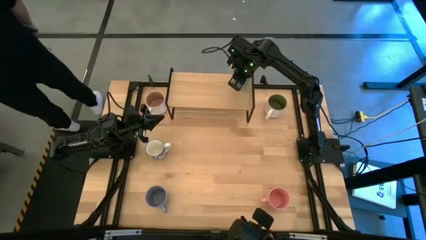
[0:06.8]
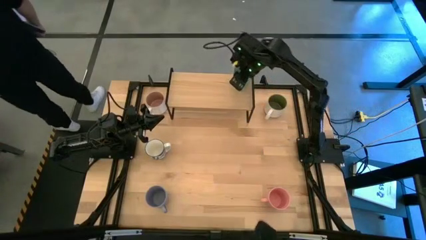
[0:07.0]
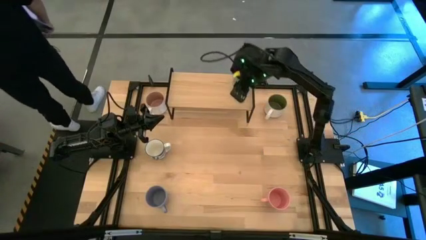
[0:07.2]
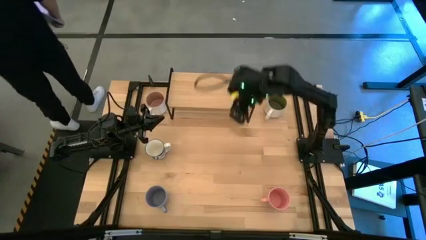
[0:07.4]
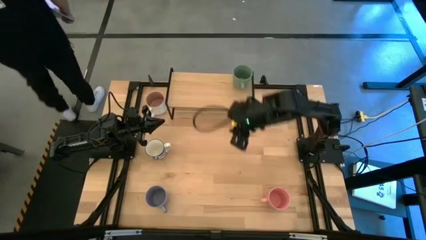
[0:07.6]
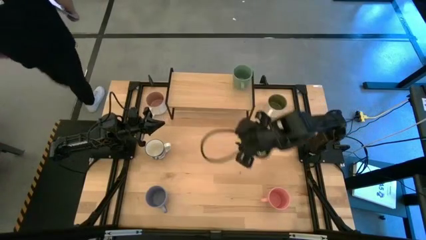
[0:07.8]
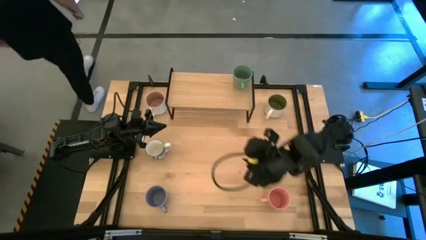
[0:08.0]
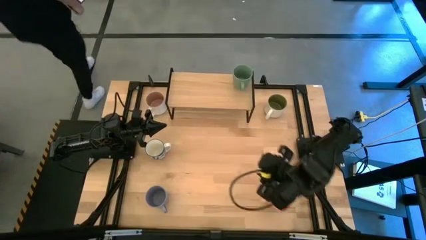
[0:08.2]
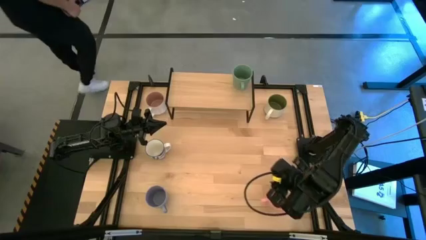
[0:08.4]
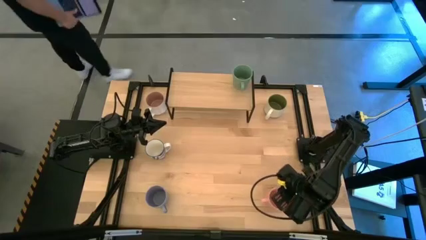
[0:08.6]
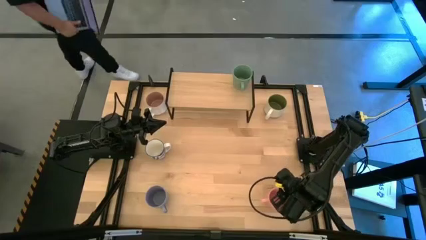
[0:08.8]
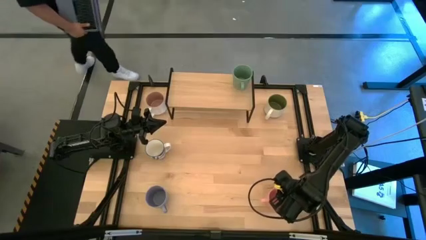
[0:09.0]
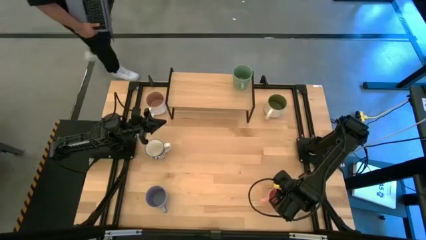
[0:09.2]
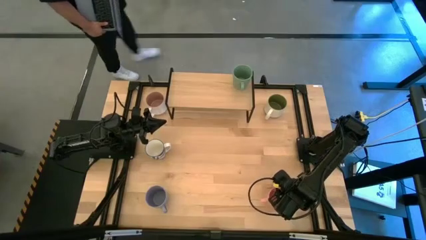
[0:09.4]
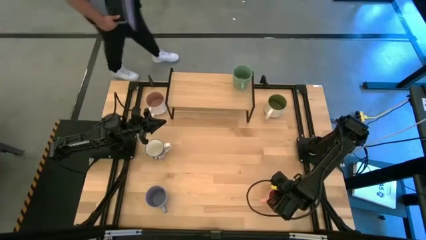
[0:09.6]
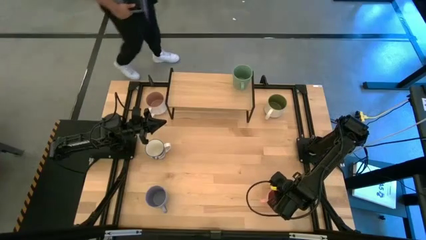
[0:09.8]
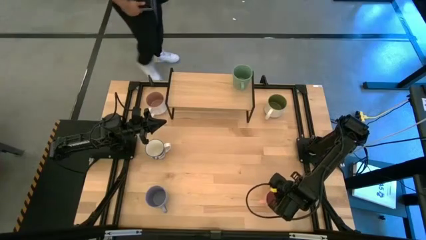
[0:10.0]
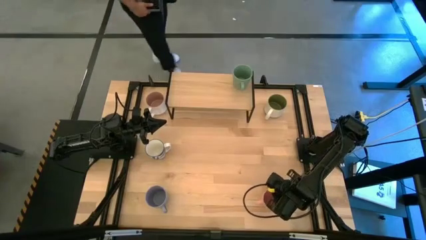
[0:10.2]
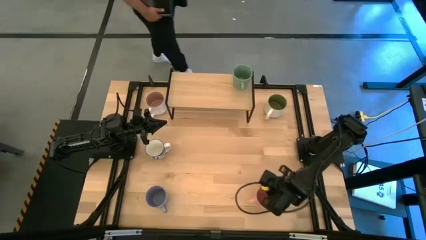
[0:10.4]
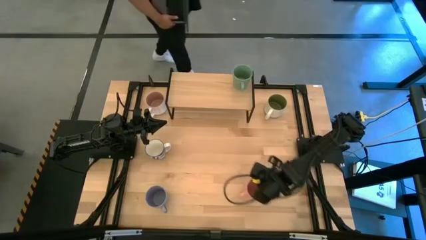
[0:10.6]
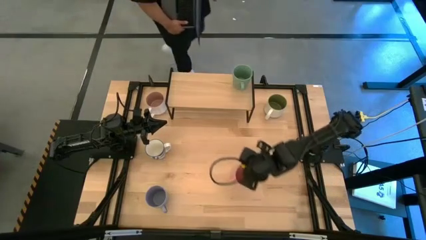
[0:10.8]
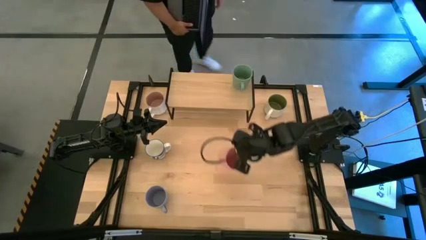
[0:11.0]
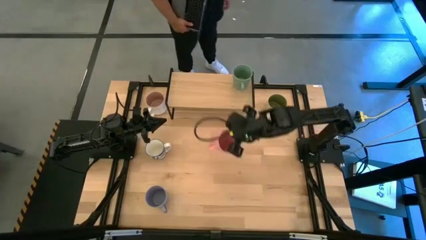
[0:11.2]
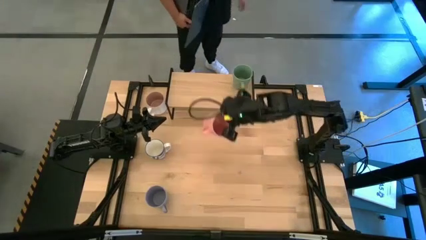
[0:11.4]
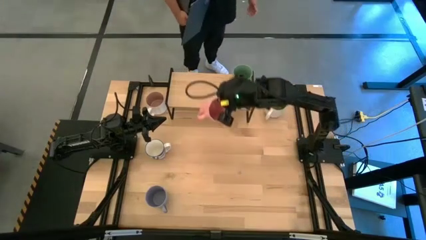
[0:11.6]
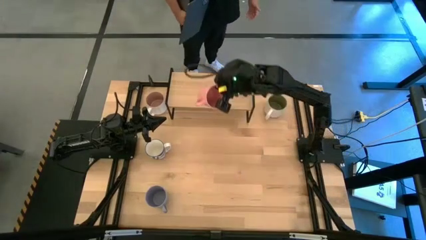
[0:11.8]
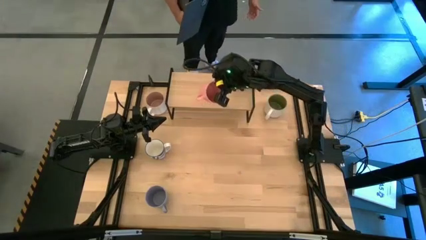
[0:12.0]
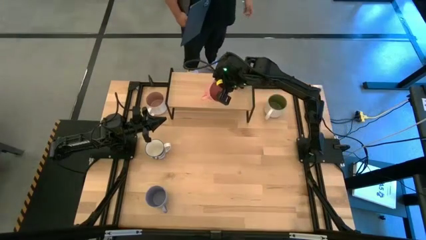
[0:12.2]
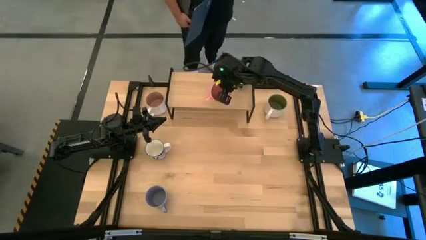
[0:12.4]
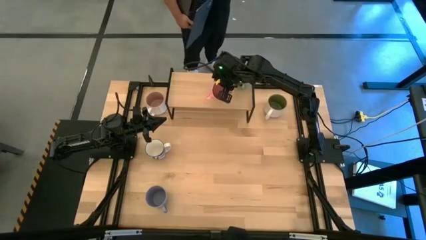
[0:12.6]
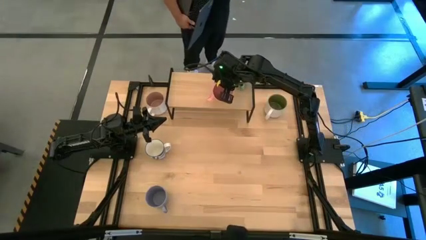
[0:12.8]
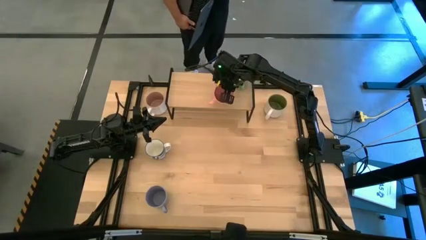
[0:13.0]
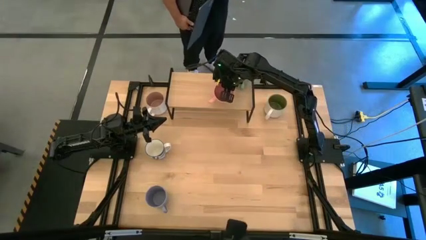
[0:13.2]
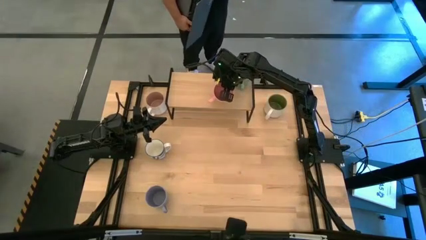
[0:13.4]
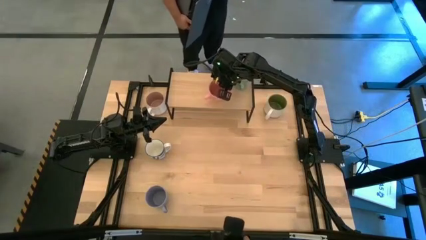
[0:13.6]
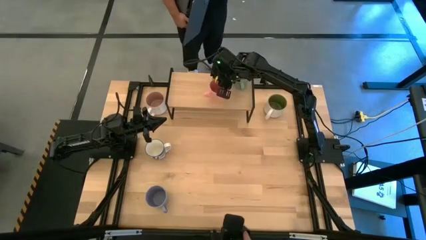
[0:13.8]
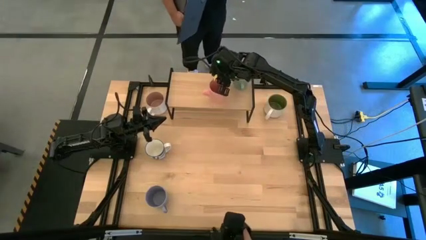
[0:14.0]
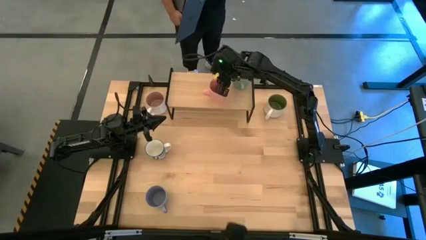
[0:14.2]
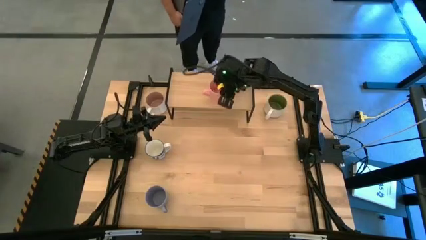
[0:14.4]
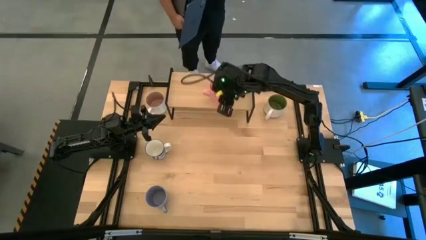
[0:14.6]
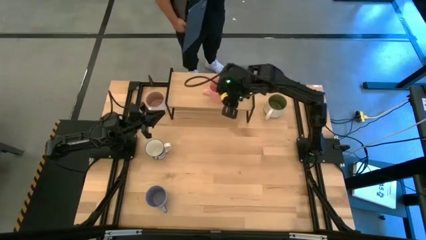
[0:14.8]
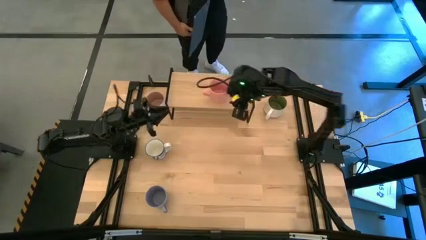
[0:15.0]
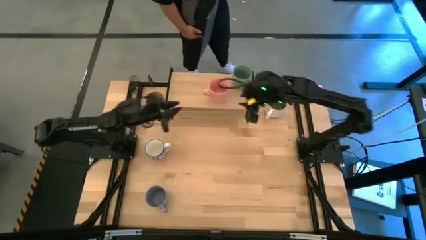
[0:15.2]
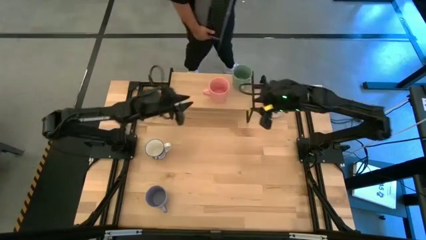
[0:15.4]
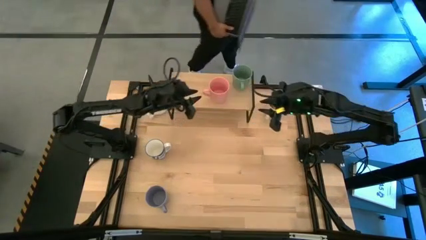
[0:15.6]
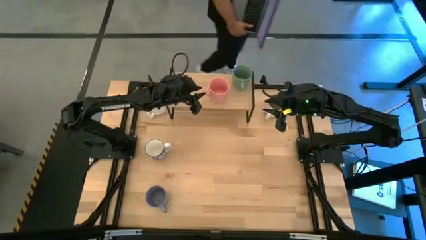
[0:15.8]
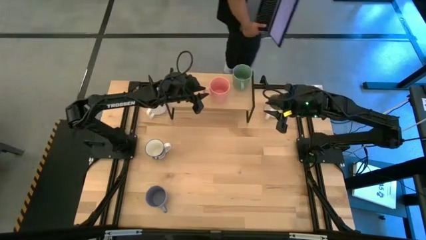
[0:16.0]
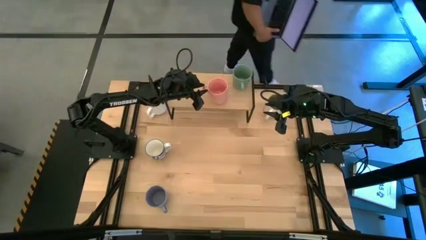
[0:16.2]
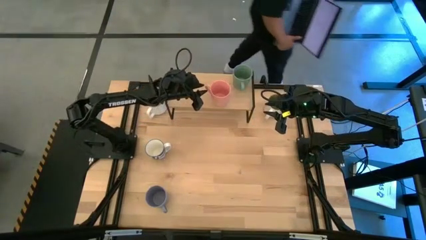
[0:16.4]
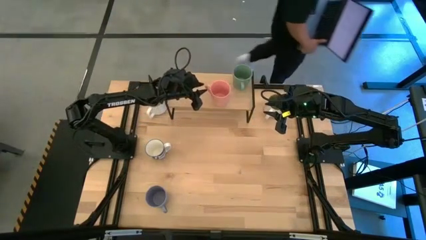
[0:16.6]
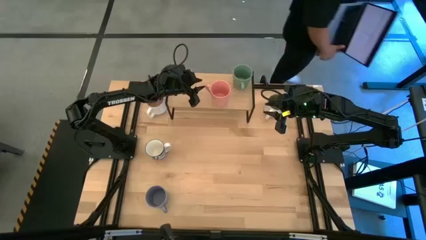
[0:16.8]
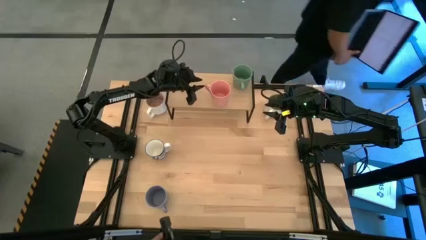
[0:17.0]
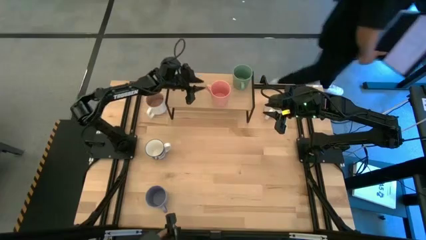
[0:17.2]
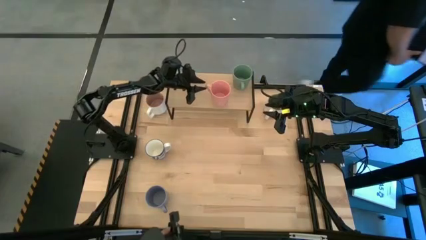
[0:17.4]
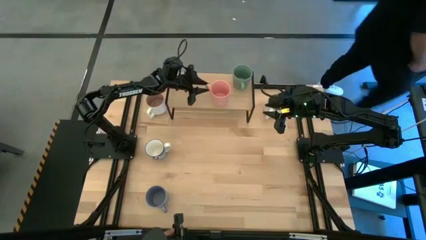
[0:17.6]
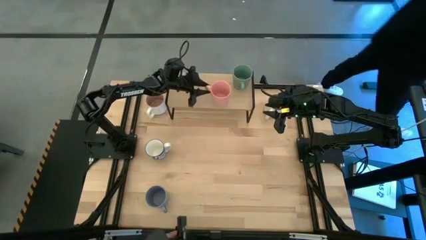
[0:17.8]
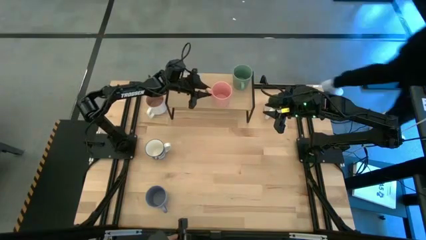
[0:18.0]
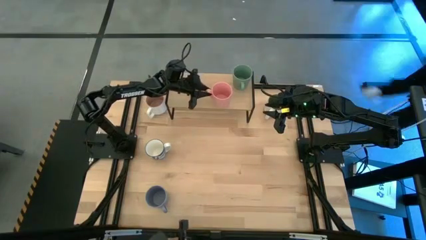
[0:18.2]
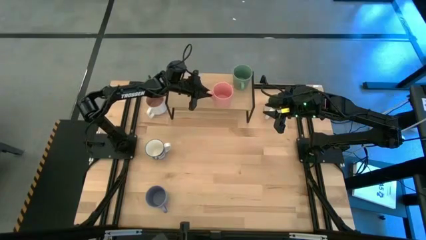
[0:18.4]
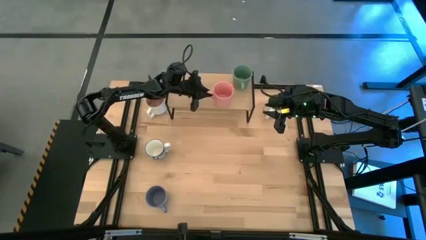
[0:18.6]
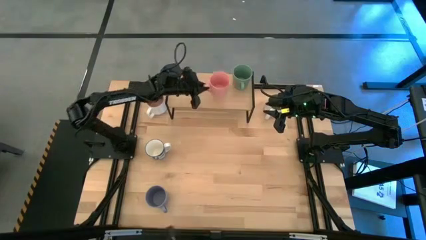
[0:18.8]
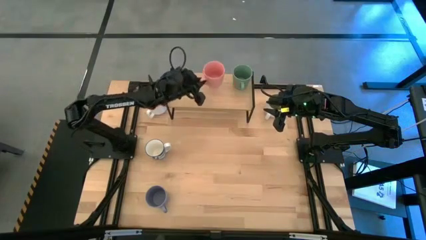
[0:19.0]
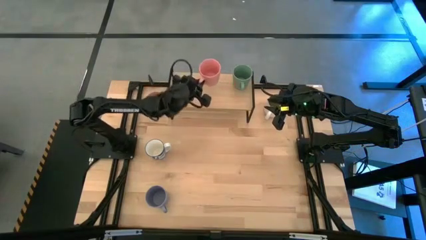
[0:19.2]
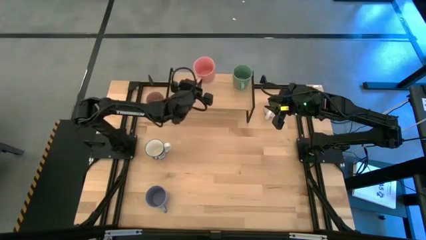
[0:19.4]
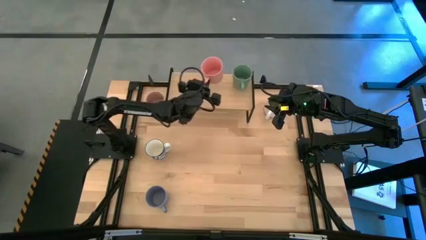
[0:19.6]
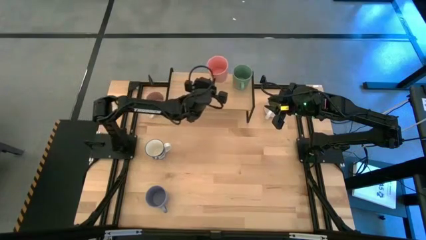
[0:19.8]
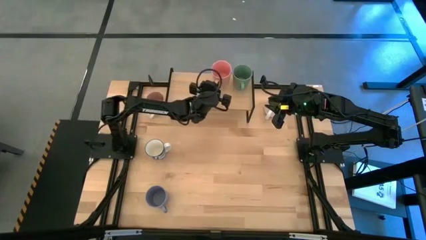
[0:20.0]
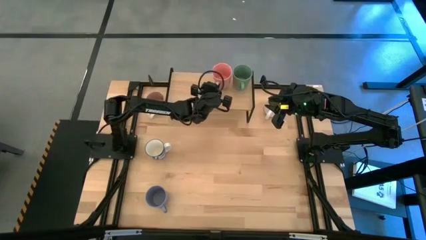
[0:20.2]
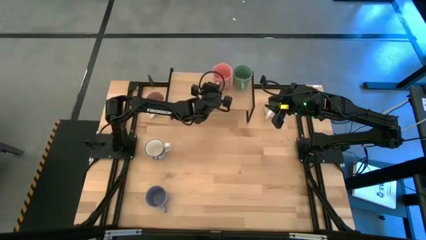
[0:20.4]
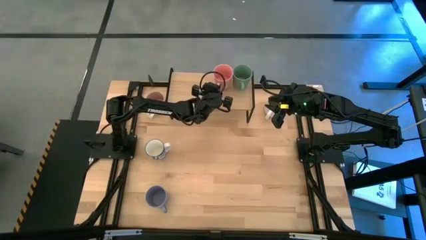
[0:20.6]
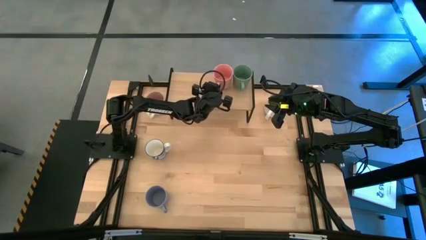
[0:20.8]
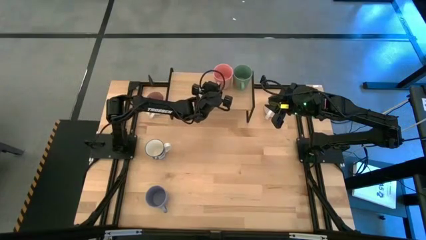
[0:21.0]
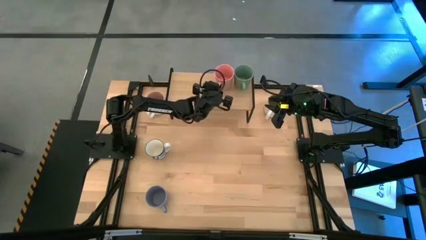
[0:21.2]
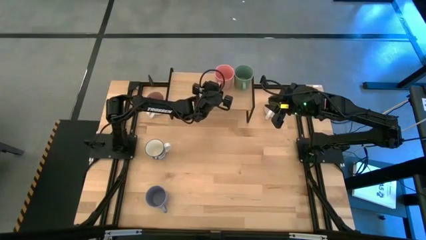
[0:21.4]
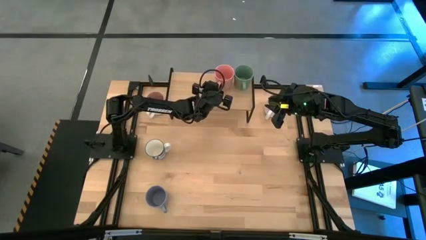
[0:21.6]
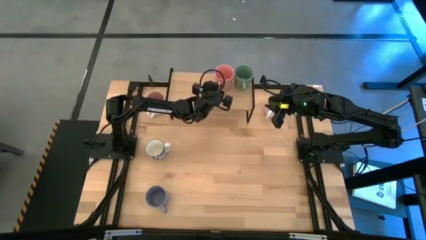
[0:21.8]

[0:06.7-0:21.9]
Task: Place coffee mugs
Put the pink mug on the shelf

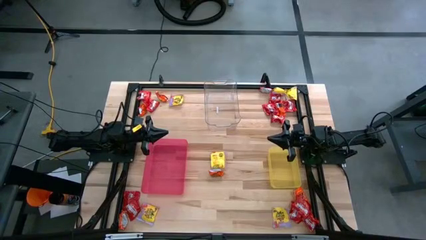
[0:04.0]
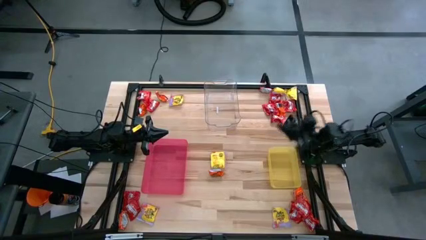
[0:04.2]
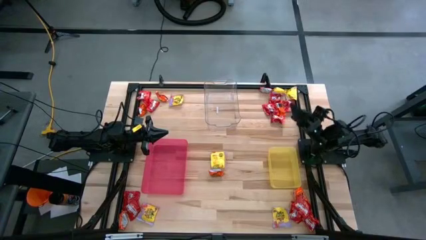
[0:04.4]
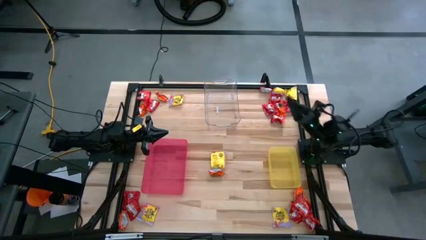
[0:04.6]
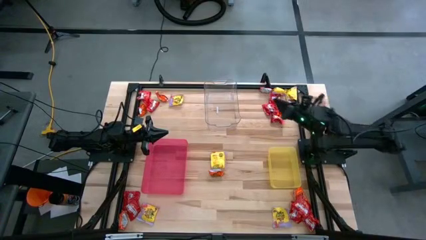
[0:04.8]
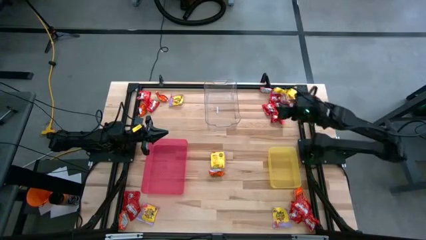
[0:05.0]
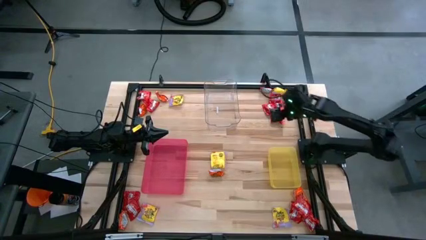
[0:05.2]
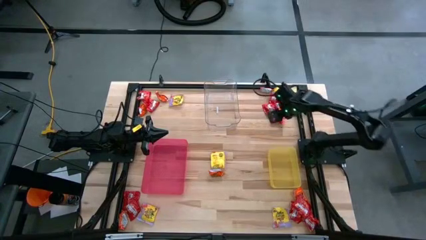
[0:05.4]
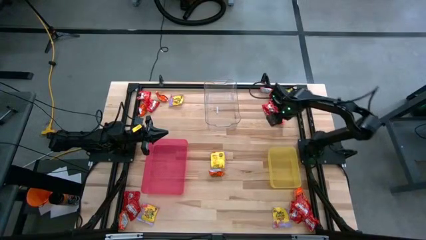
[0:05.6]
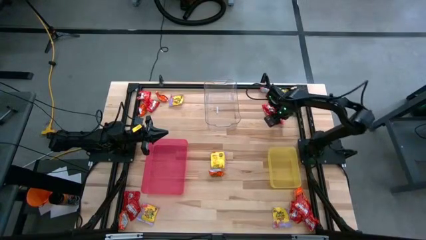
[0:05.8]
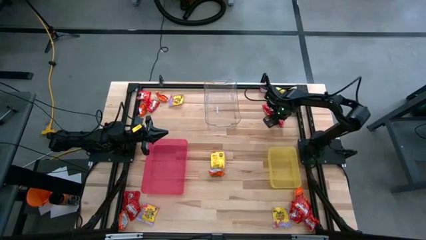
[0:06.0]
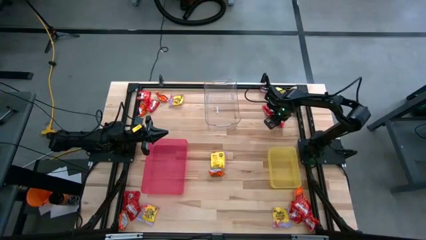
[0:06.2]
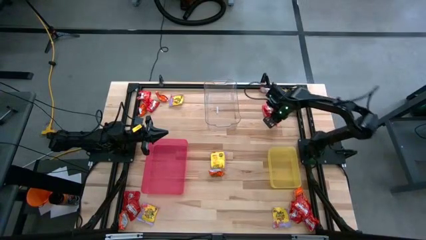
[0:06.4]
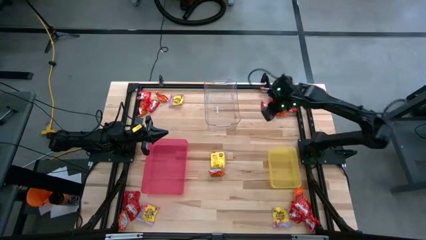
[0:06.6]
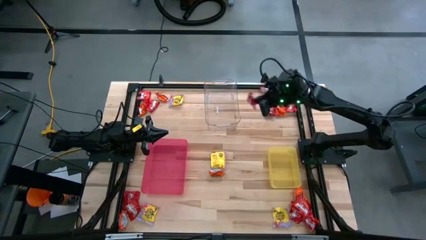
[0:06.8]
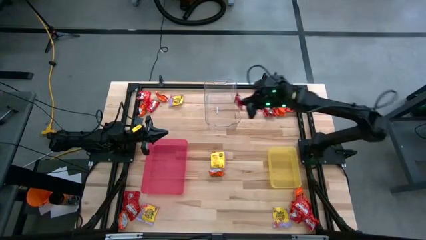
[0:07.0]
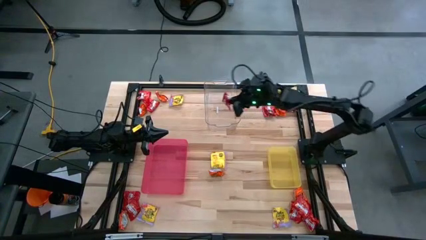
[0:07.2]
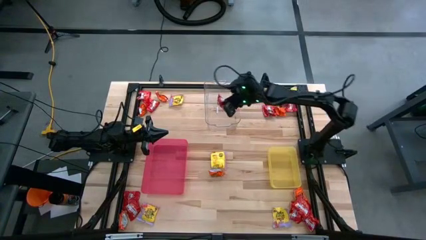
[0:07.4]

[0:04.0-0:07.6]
Task: Sort candy
Put the red candy into the transparent bin
